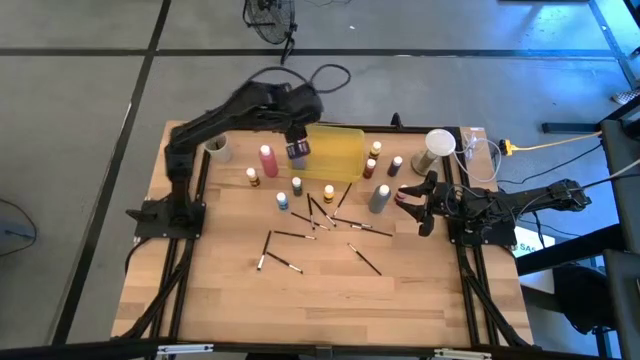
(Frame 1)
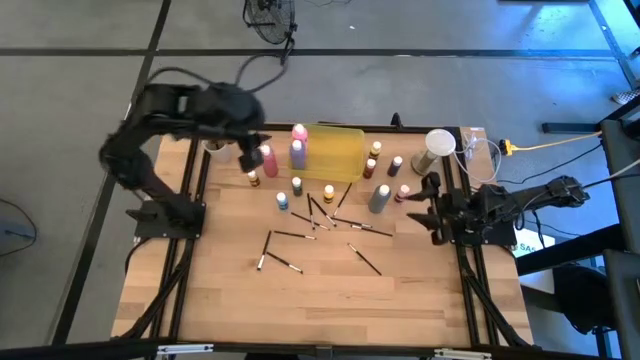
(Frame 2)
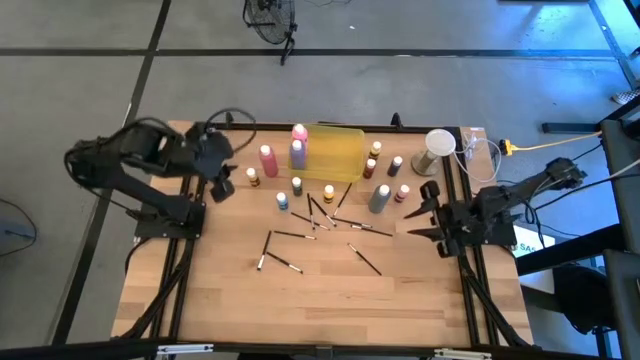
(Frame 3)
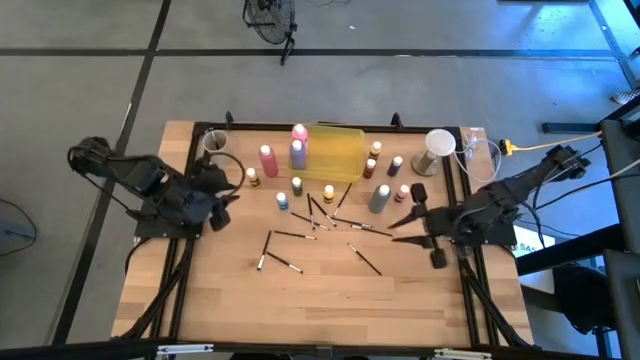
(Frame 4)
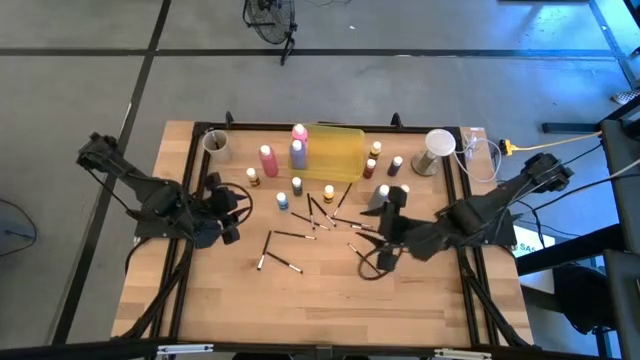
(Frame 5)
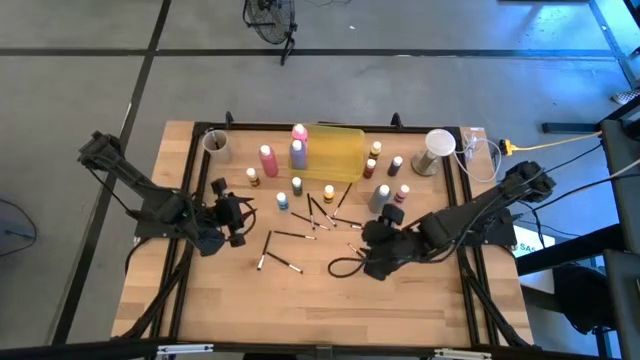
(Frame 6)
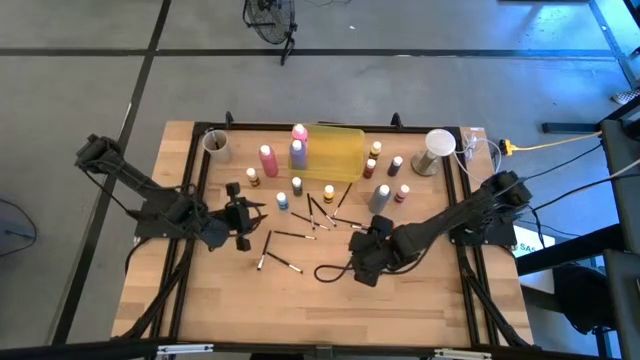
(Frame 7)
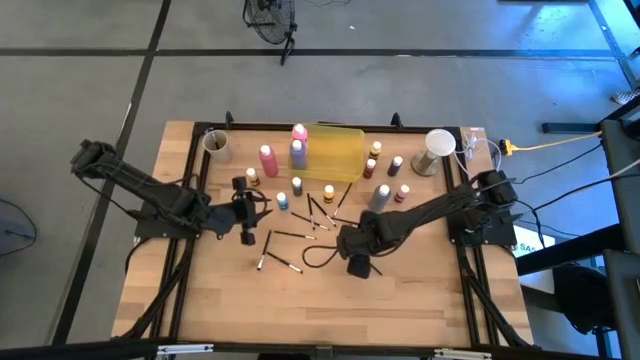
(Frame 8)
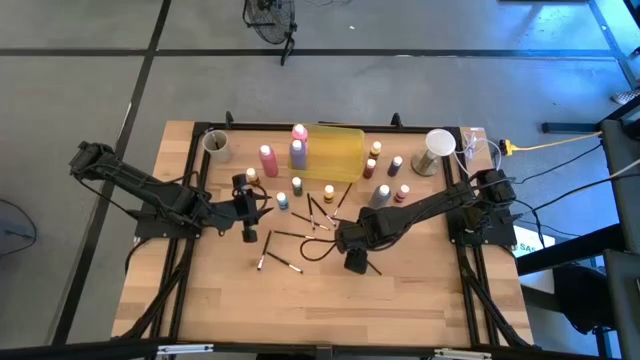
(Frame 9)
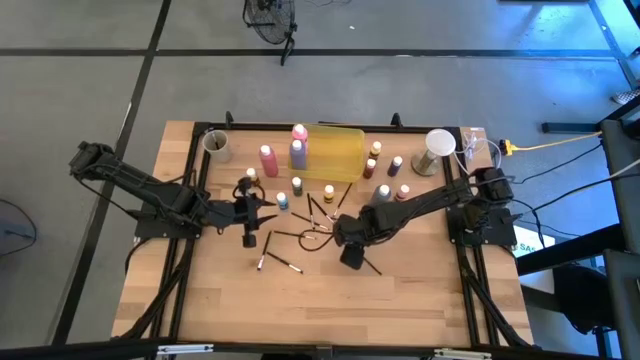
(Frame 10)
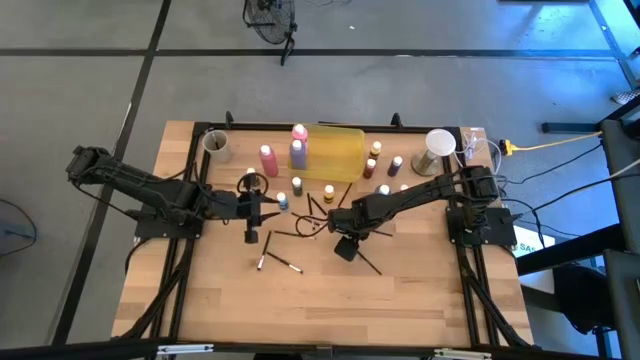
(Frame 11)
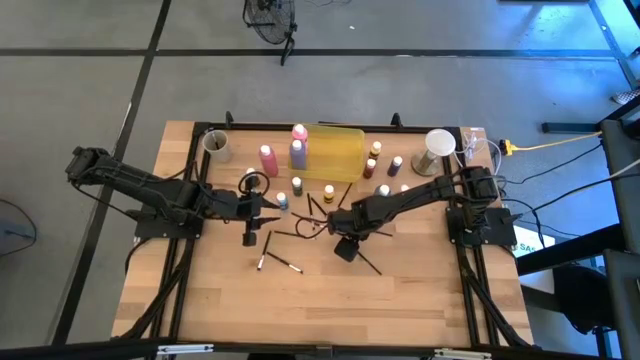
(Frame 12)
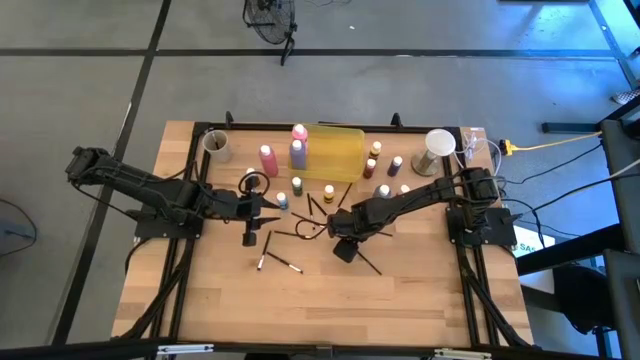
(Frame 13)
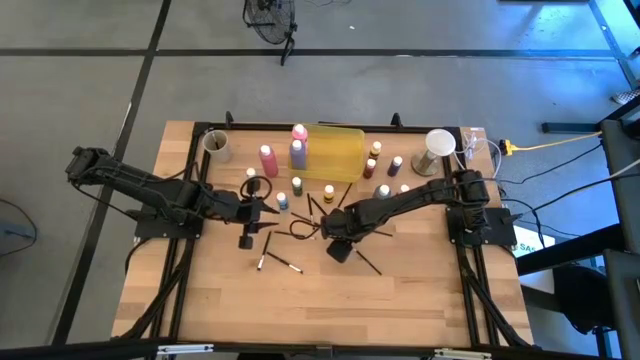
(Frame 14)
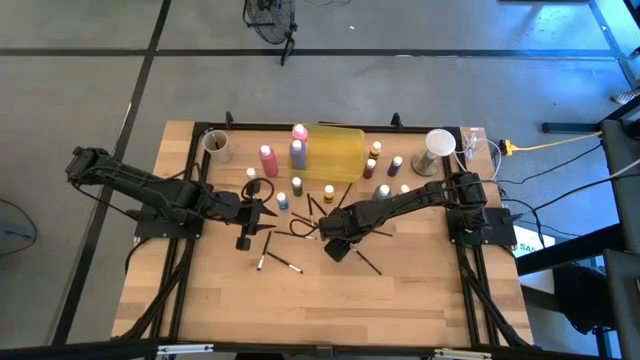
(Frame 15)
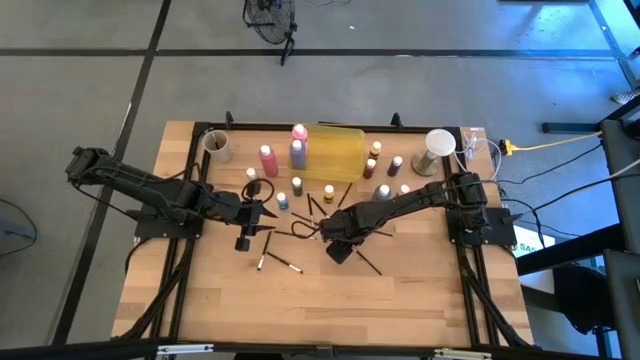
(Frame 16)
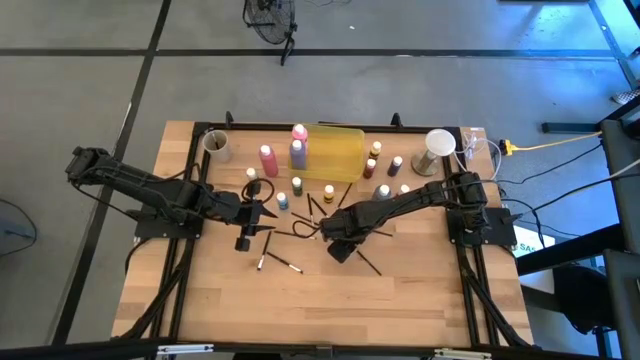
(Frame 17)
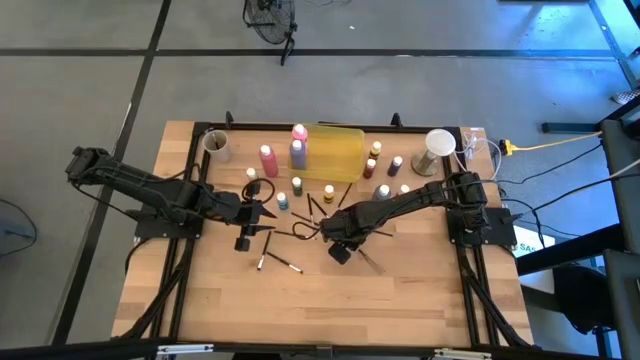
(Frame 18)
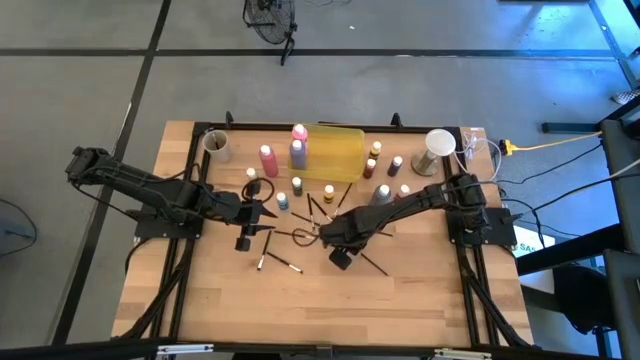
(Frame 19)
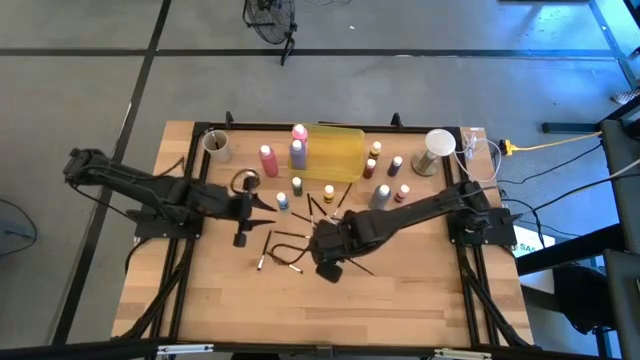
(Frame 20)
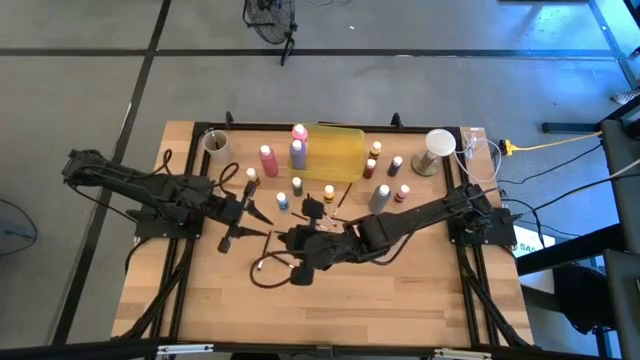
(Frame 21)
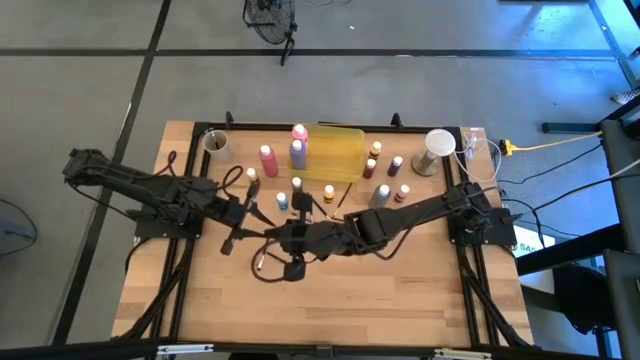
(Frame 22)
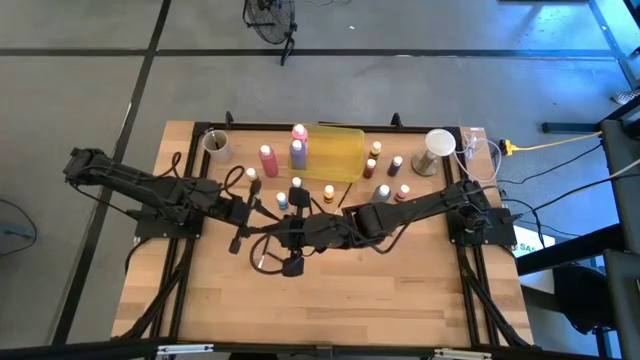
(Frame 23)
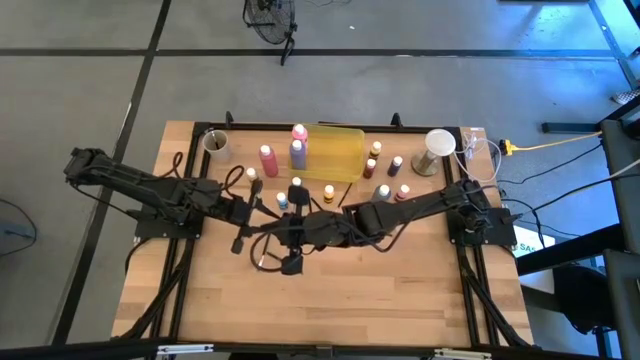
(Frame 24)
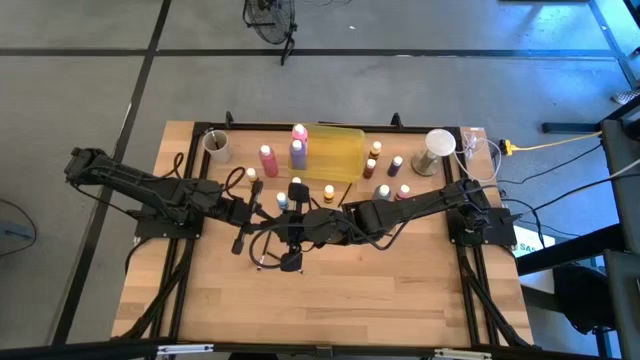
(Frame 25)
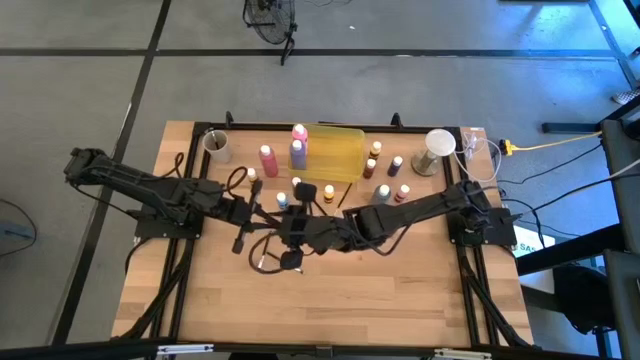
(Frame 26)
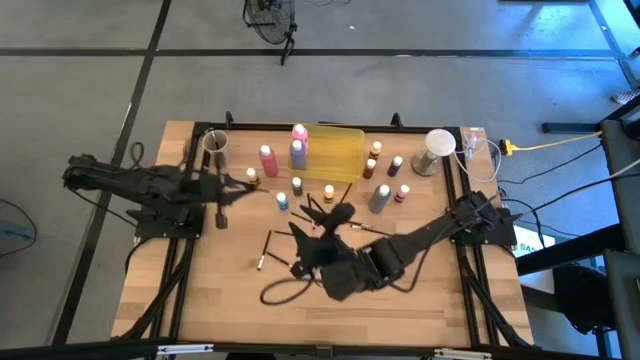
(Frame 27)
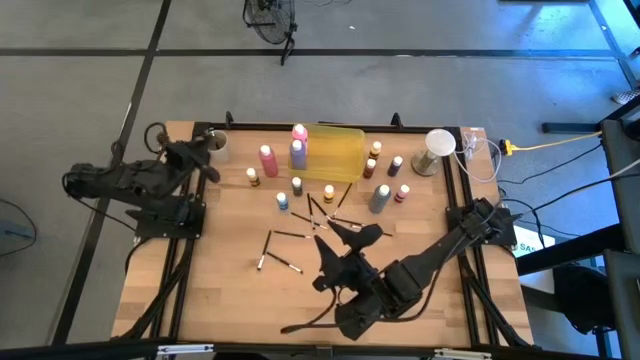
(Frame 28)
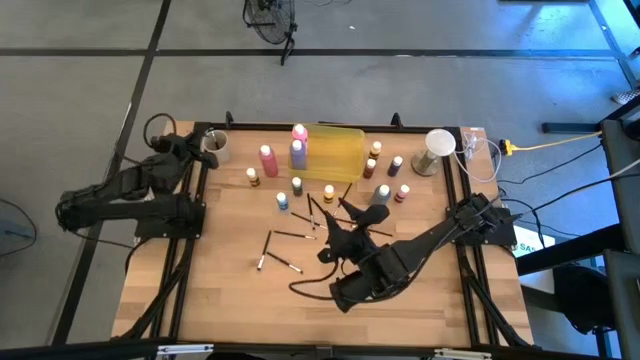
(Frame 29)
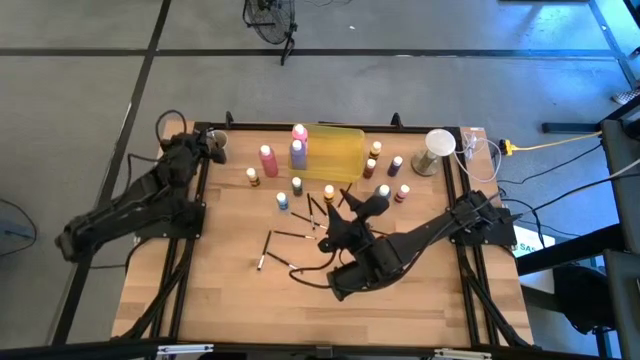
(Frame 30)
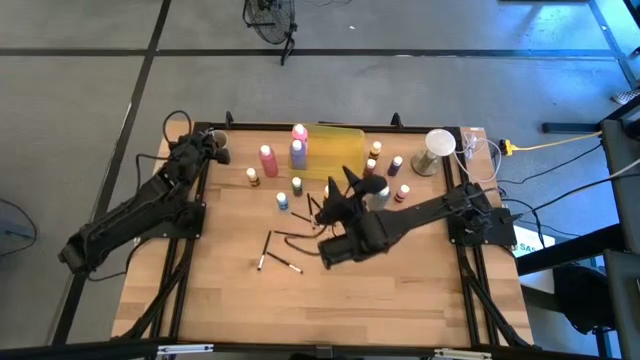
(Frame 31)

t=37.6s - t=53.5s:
Task: Pick & Place Paint Supplies
Put the silver paintbrush into the white cup

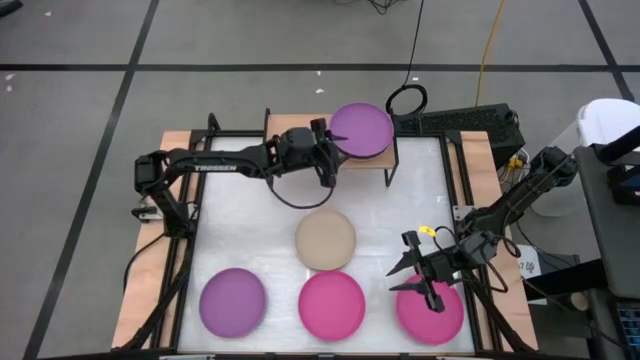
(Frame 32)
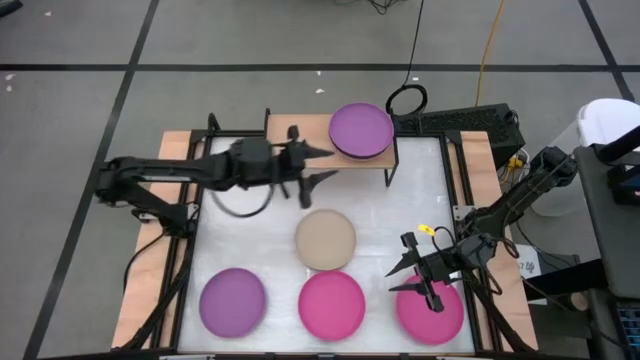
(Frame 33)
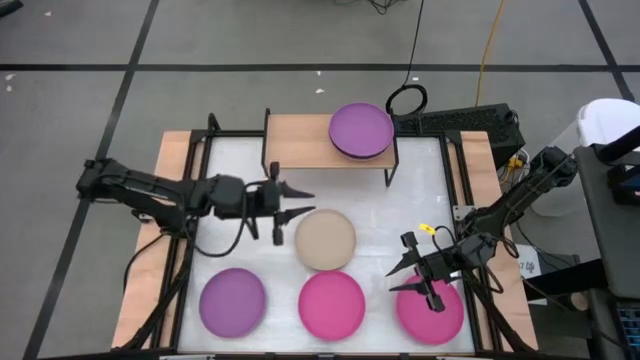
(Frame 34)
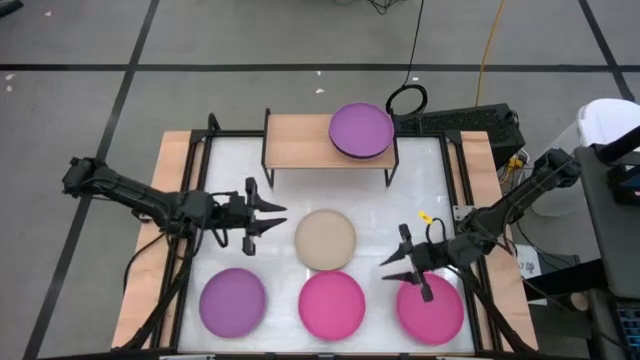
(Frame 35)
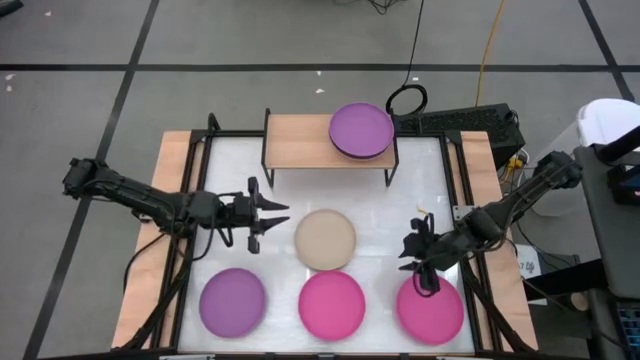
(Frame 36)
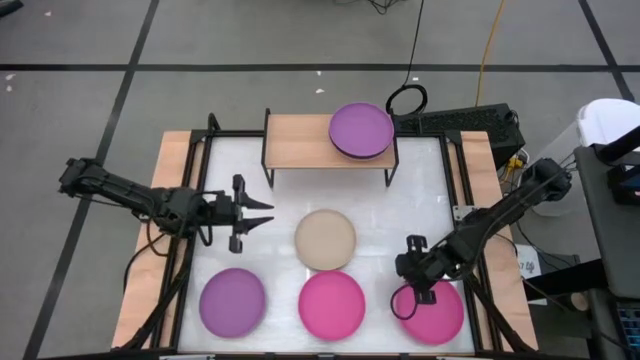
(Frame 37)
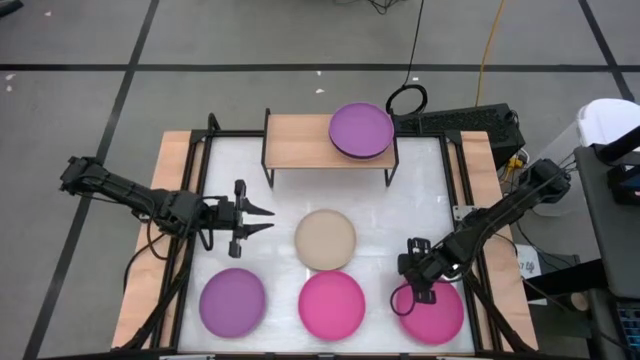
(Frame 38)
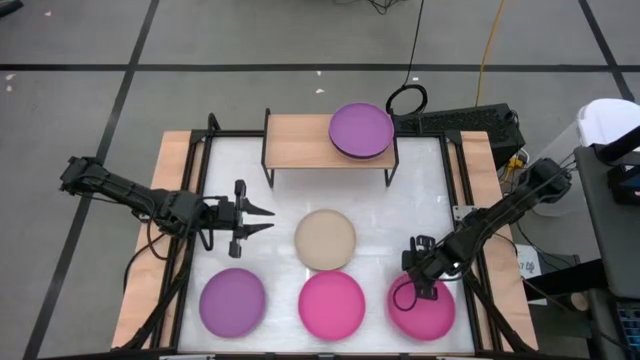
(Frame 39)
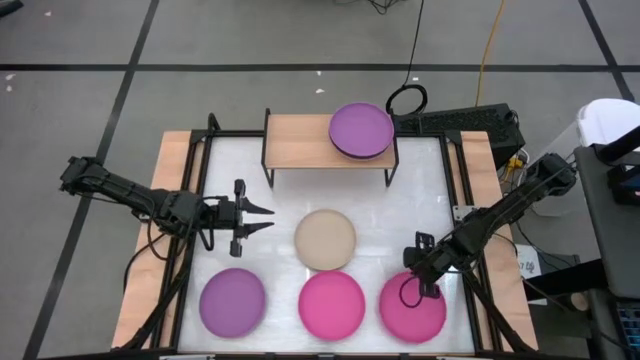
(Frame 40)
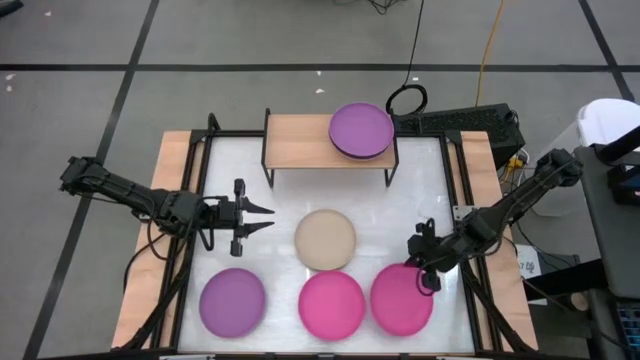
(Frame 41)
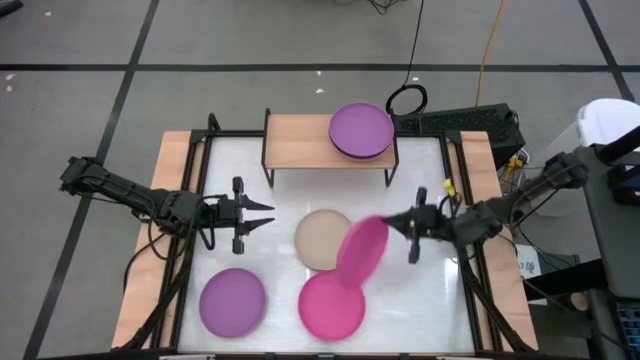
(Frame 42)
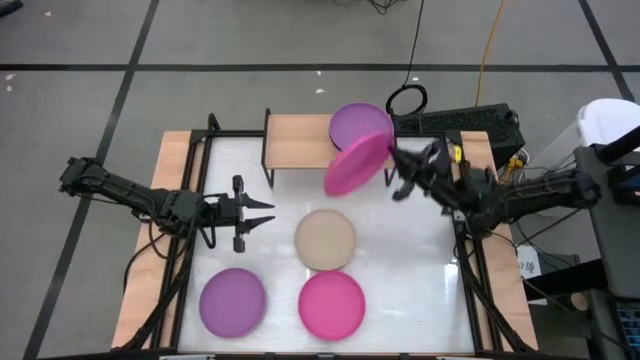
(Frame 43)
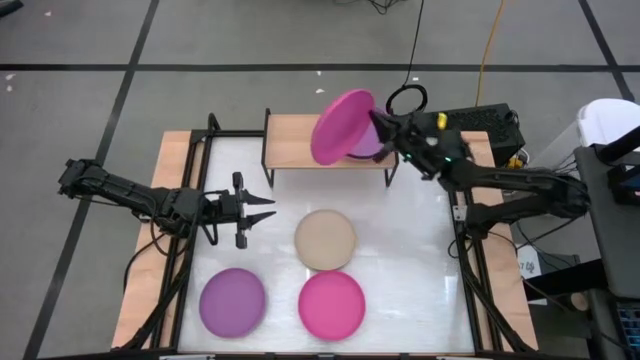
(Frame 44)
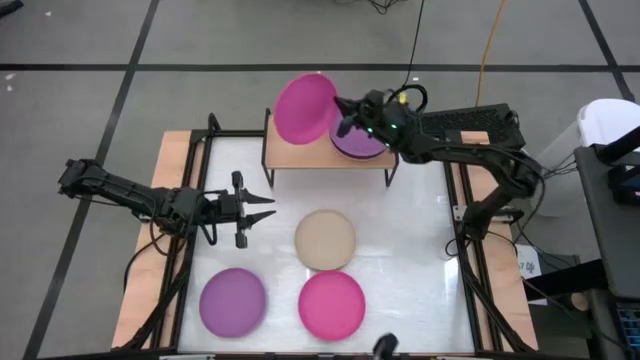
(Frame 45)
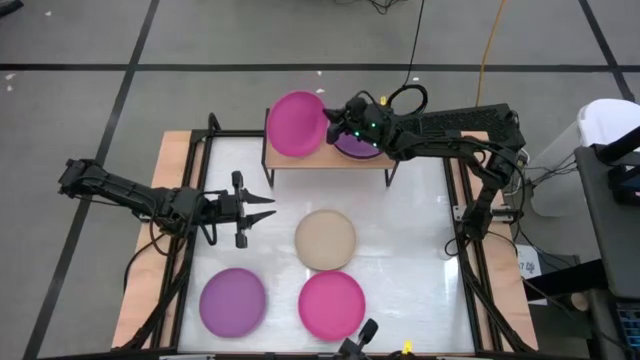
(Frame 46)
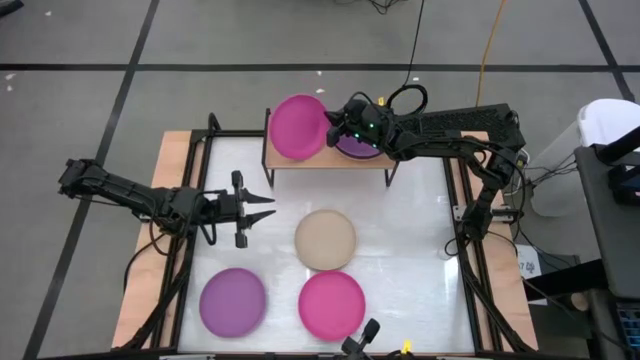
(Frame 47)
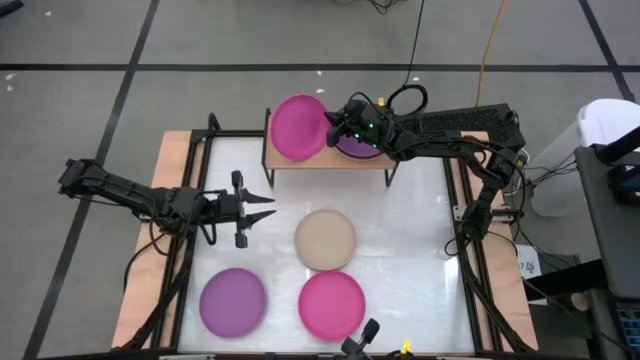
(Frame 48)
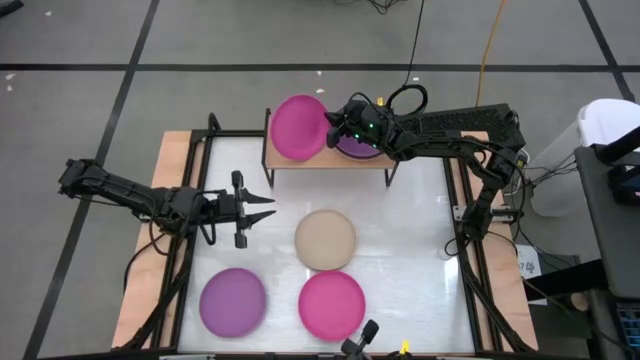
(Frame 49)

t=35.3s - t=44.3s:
Task: Place and stack plates onto a shelf
Put the right pink plate on the shelf
